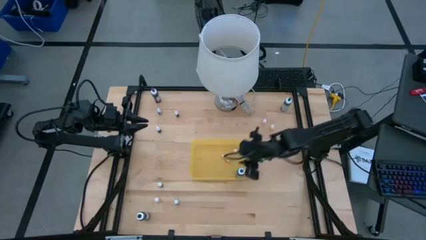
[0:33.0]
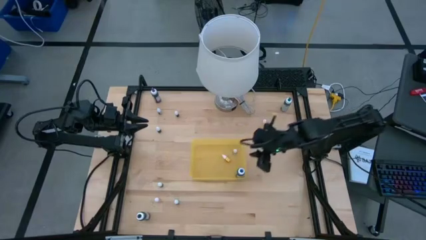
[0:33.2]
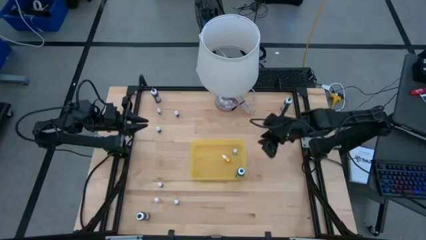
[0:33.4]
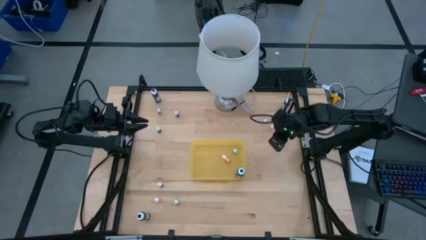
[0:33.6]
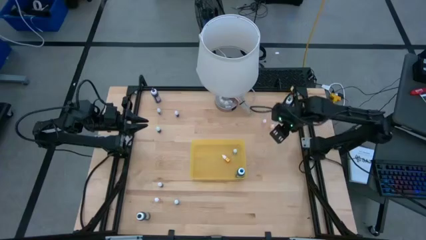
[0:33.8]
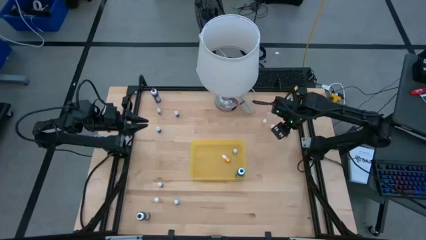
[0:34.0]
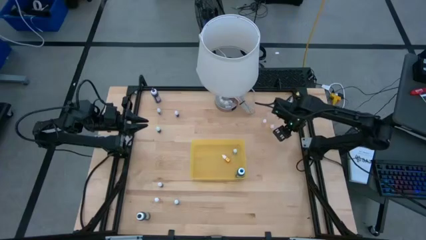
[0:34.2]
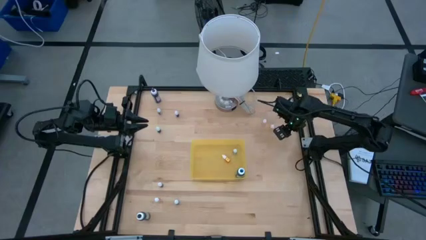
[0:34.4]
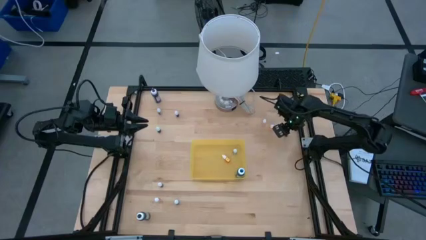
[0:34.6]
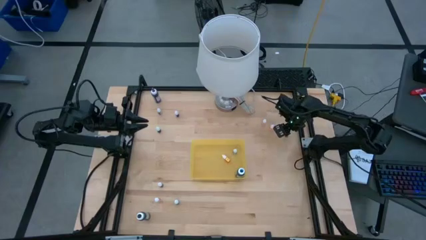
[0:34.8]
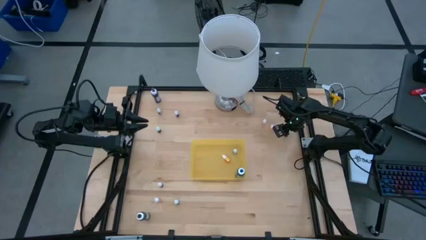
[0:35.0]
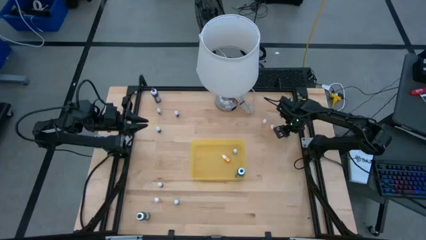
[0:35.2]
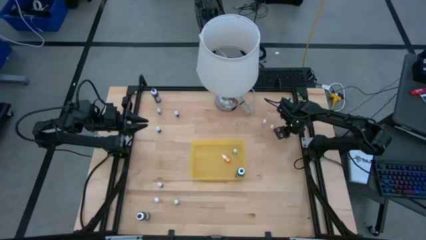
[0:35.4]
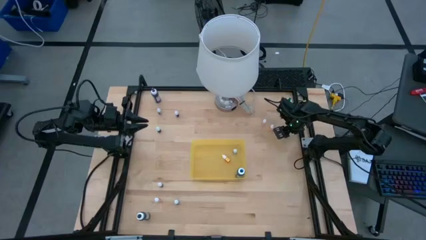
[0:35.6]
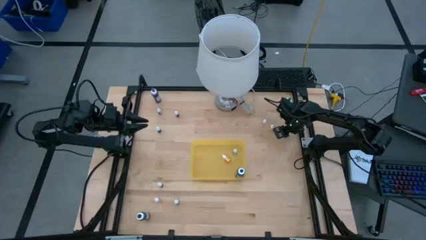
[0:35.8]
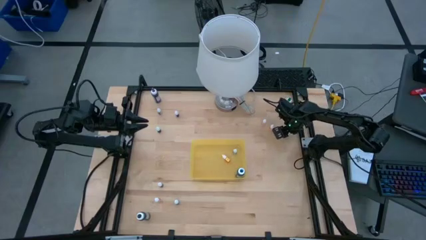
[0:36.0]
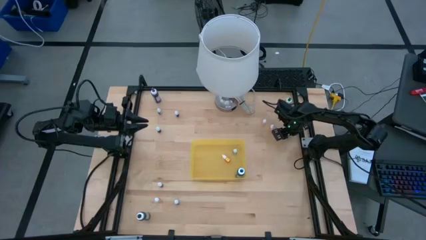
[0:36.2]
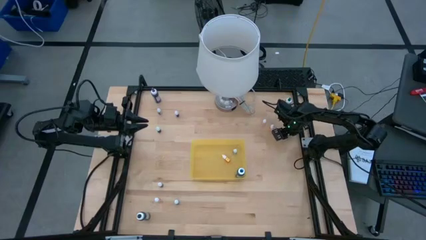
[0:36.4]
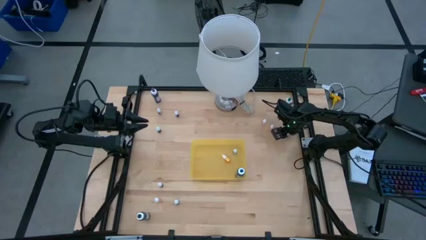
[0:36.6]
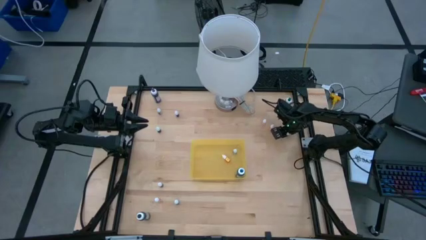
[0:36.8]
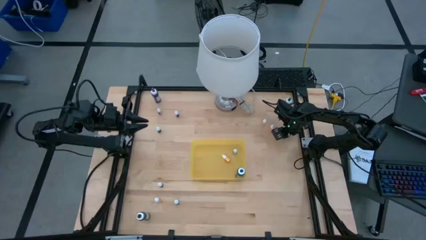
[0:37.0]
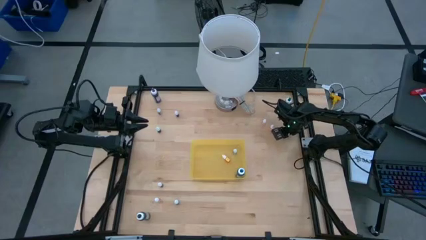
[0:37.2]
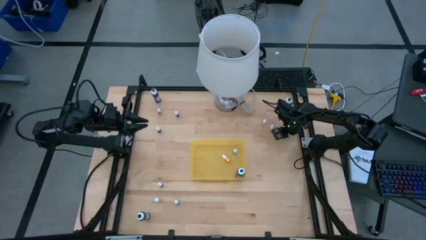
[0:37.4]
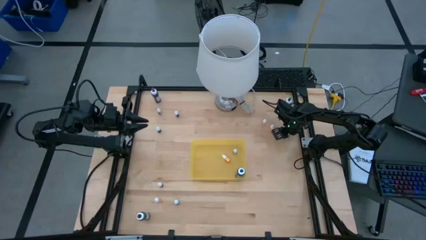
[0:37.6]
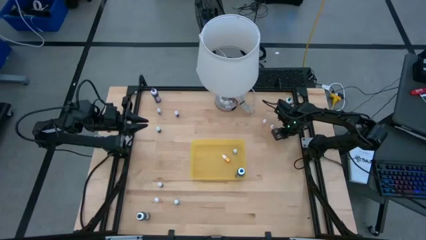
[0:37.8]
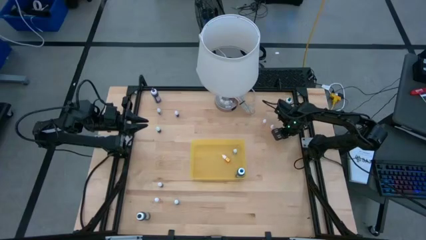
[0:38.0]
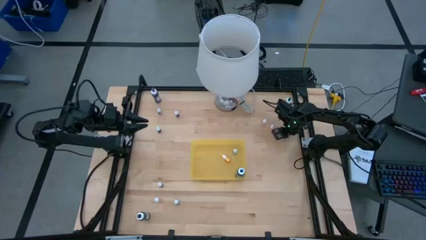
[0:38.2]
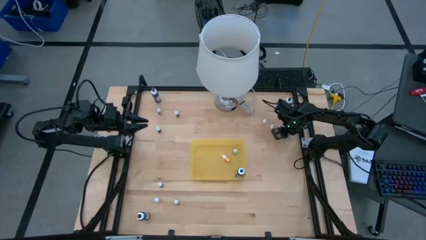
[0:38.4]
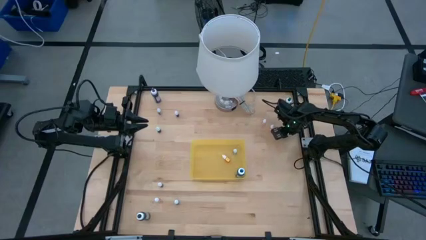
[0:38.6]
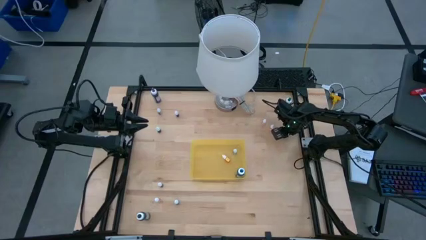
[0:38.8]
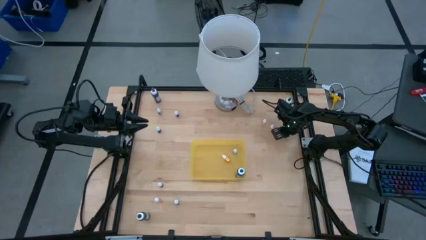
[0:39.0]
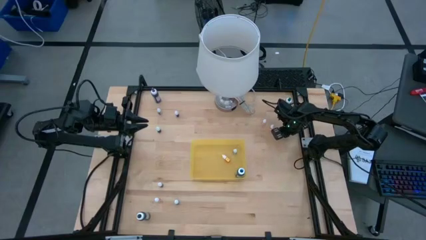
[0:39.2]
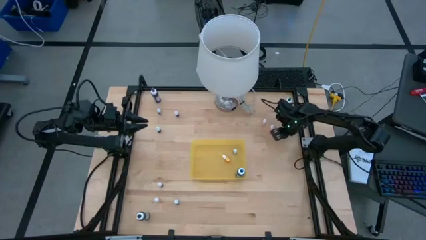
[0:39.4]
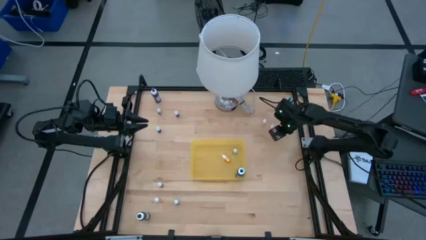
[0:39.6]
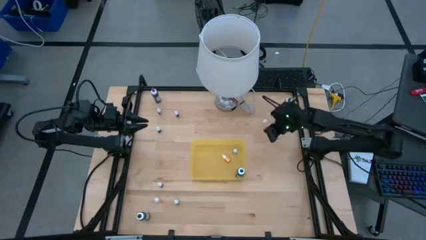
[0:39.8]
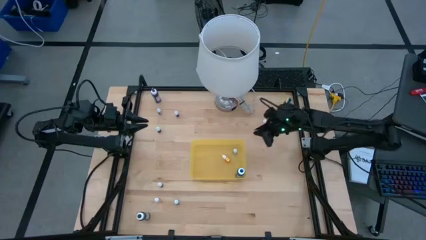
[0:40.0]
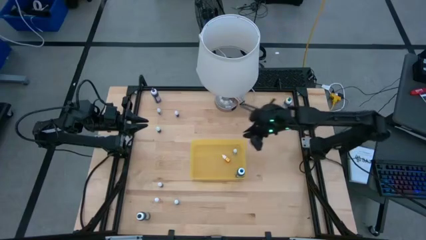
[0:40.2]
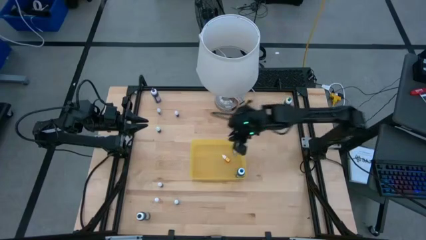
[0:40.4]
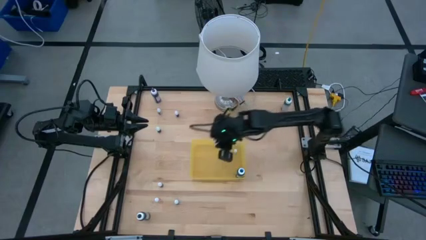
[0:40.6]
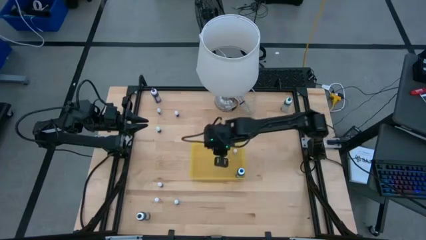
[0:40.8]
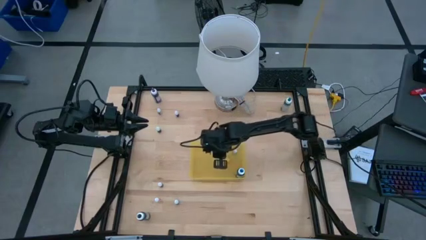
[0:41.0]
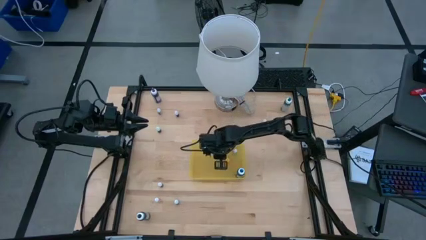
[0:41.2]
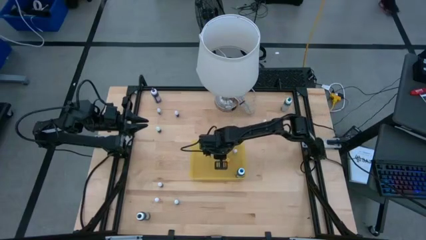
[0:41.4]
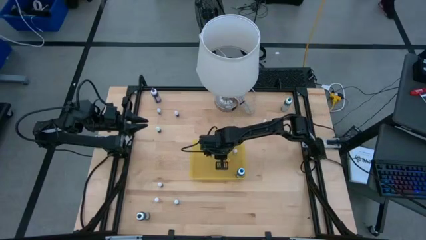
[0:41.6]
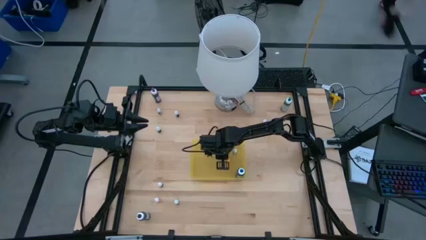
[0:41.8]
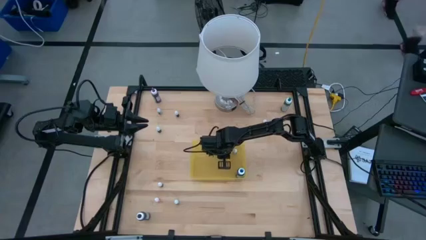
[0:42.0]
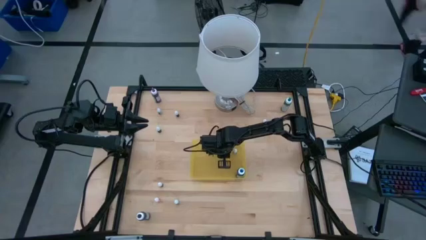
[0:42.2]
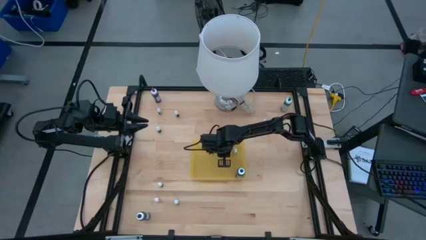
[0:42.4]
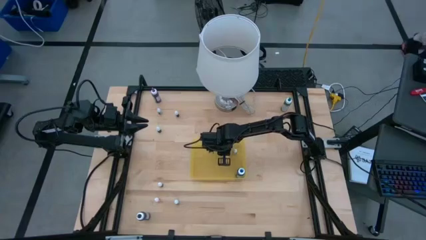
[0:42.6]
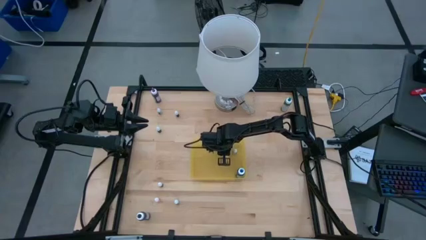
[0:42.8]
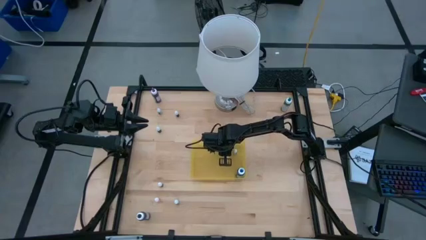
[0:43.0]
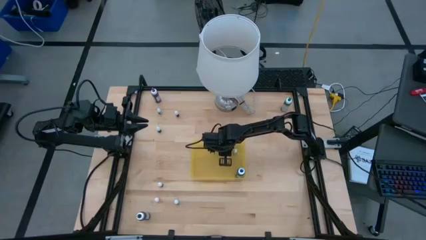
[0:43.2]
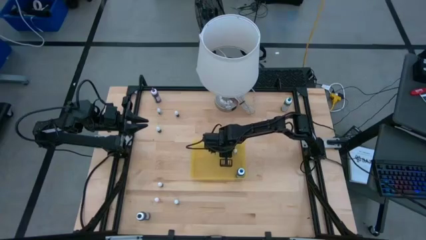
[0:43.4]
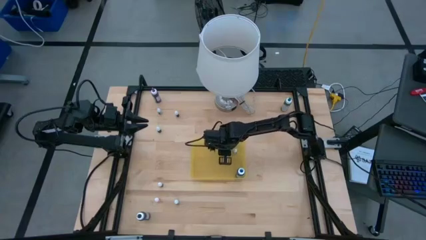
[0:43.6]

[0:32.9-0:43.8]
Task: Pick & Place food coloring
Put the purple food coloring bottle into the yellow bin

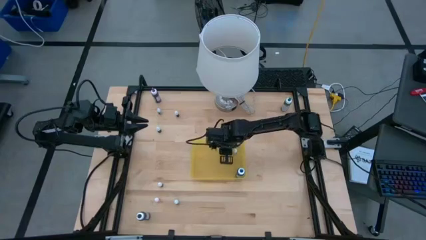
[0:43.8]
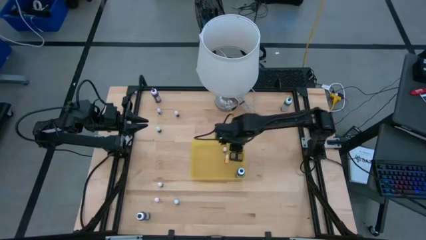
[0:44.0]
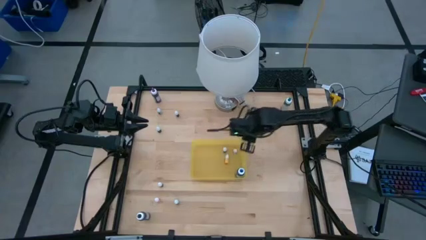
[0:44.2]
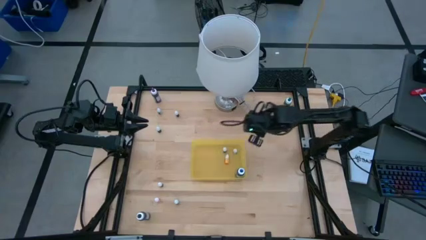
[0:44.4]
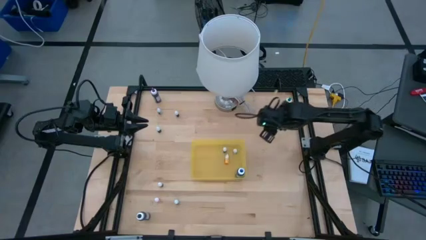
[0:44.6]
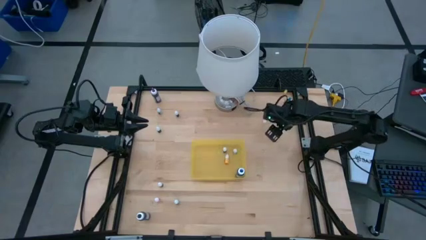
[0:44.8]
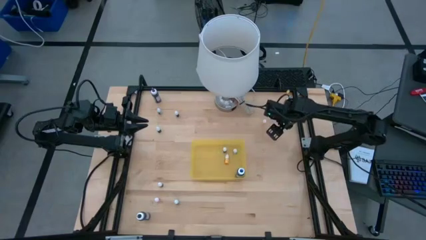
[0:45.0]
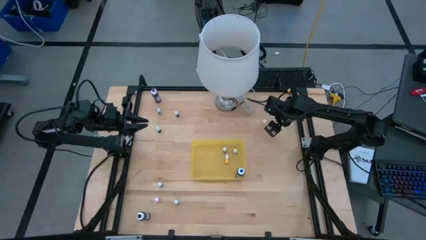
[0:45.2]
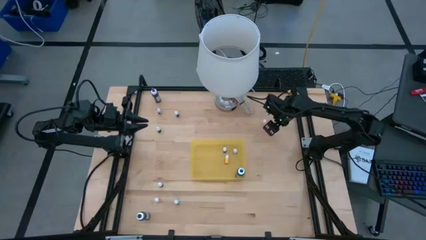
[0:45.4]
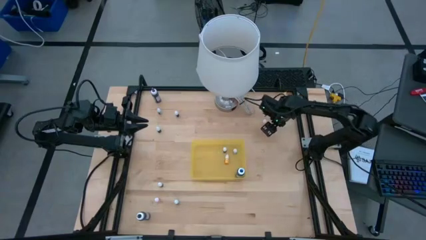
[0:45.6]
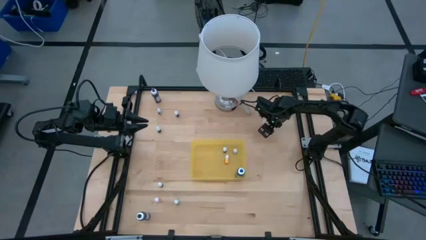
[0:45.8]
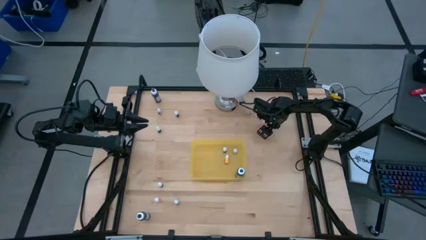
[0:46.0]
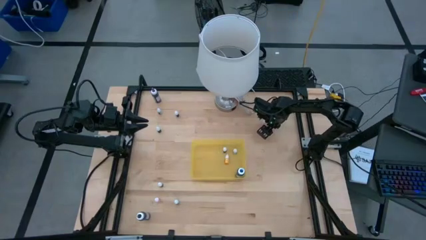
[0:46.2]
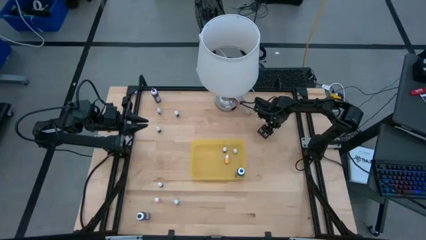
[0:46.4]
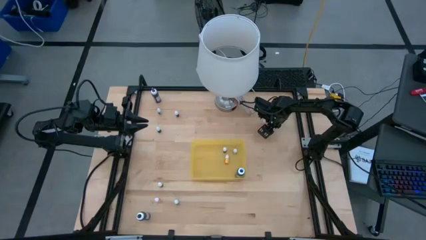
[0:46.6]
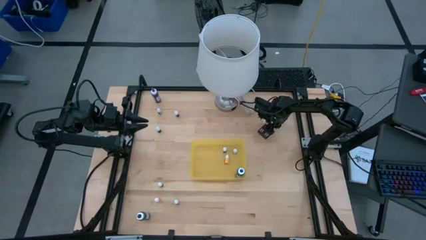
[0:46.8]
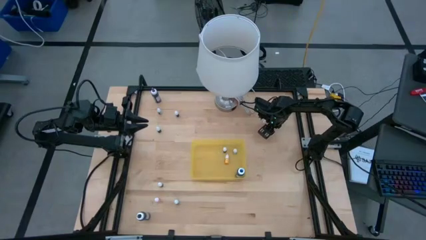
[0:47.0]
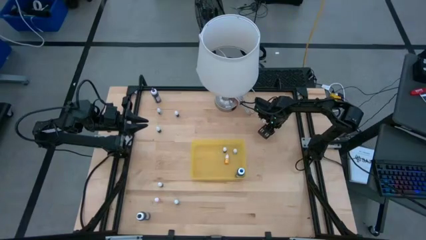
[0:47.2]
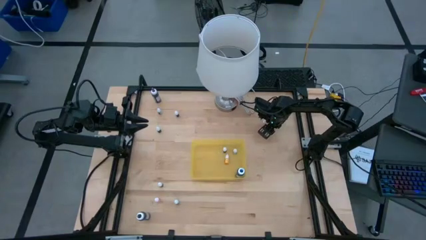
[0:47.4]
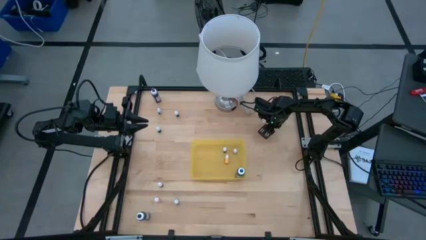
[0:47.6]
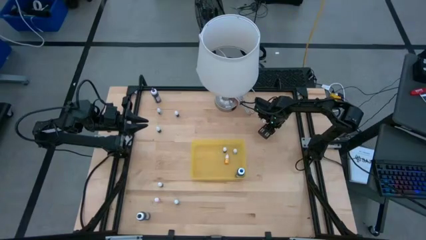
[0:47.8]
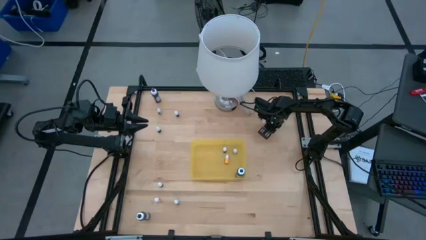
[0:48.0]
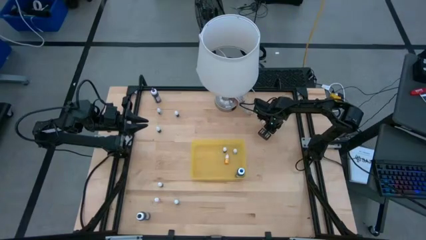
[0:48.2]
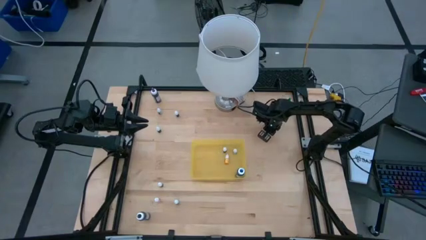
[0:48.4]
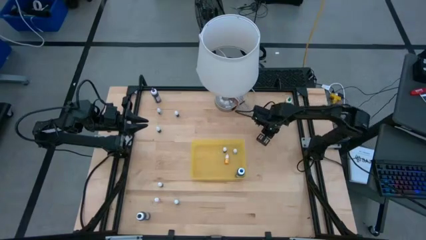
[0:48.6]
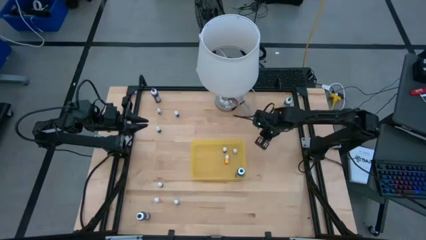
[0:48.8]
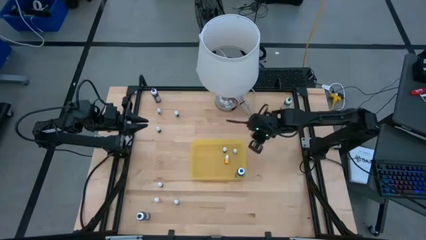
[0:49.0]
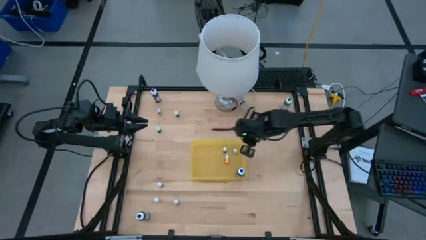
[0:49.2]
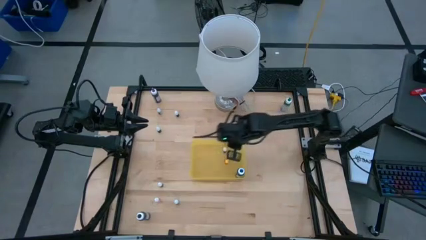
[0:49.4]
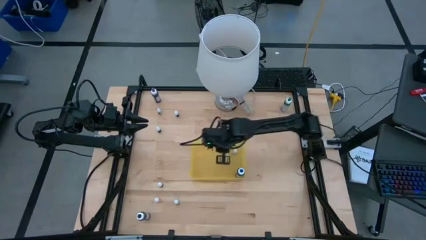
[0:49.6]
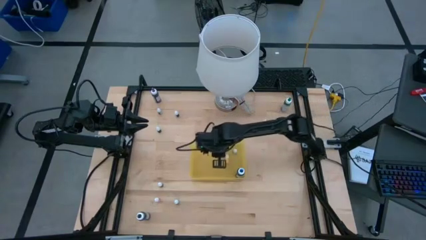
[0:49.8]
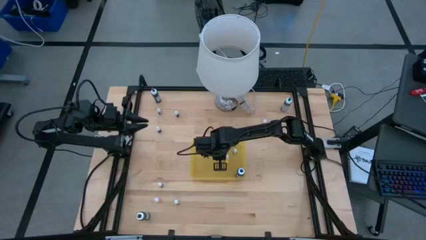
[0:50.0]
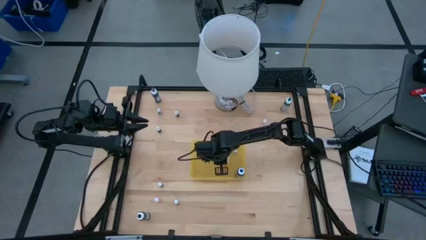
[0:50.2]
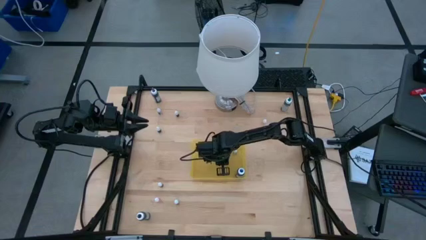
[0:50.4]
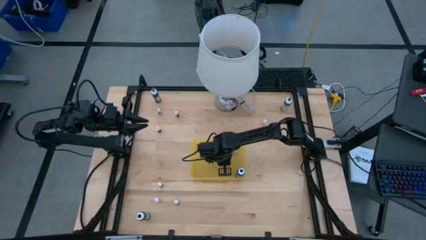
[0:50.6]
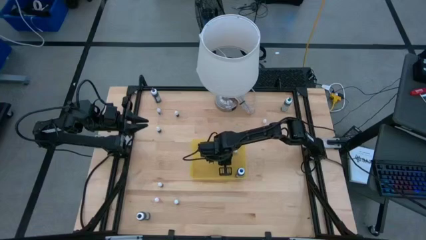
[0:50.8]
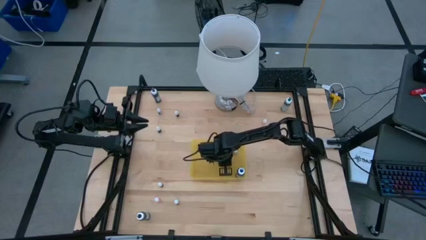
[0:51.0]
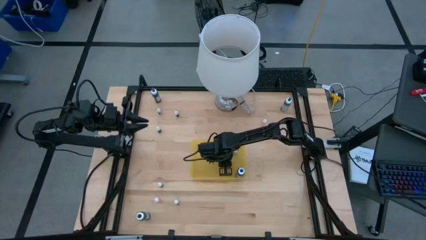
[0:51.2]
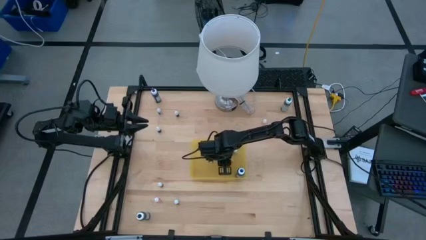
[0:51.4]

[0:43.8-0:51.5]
Put the yellow food coloring bottle into the yellow bin
